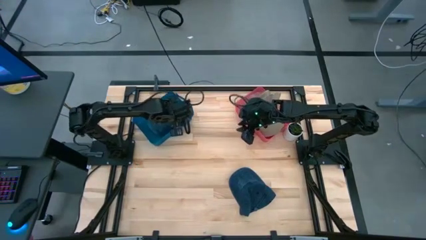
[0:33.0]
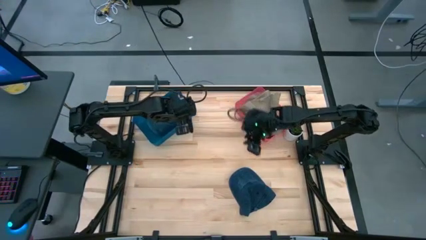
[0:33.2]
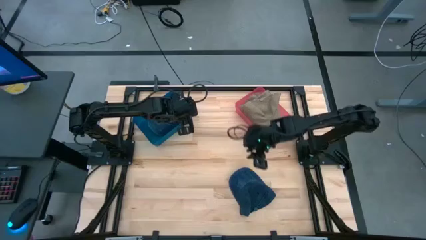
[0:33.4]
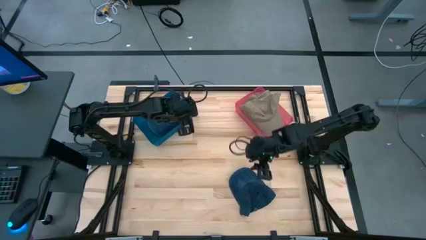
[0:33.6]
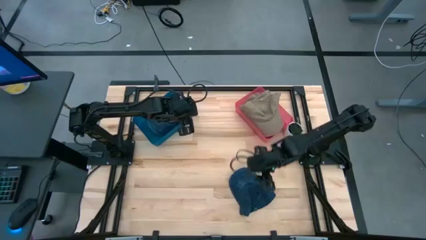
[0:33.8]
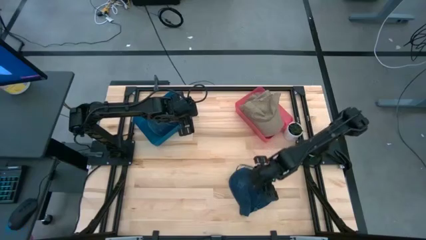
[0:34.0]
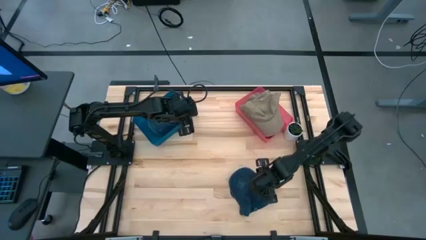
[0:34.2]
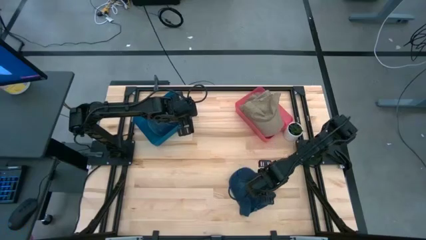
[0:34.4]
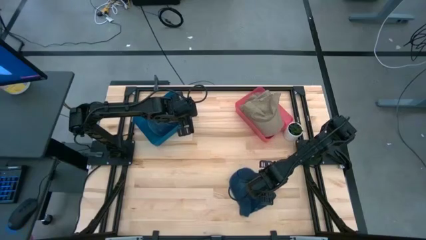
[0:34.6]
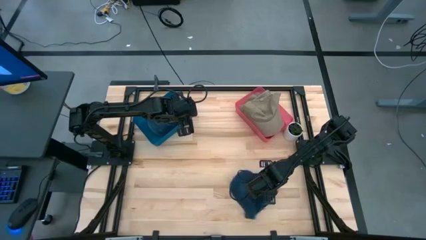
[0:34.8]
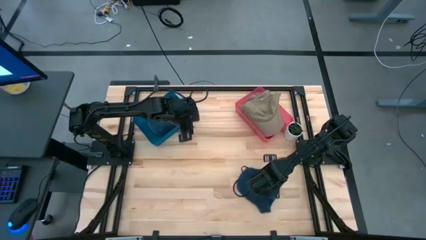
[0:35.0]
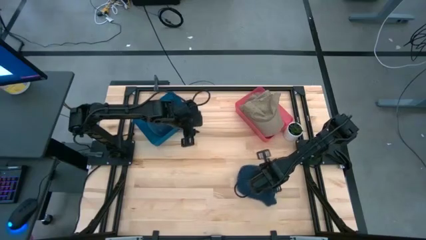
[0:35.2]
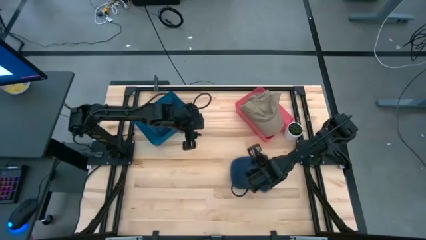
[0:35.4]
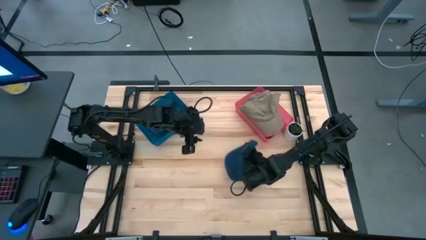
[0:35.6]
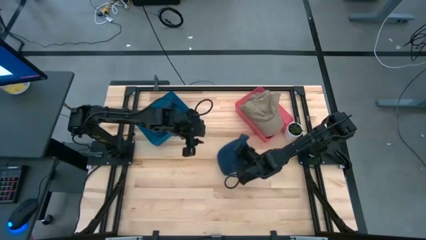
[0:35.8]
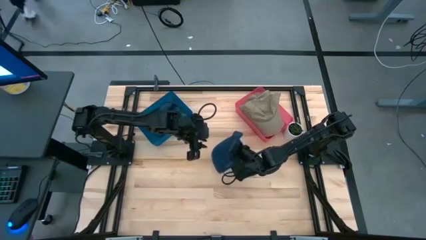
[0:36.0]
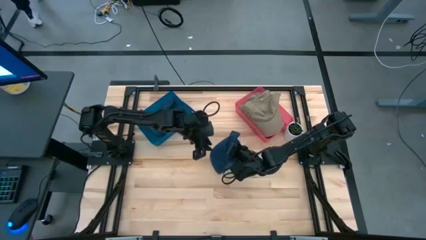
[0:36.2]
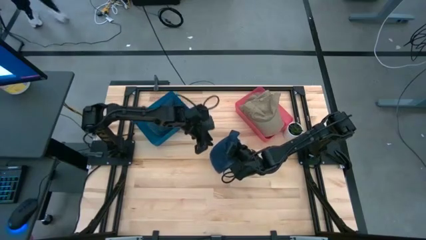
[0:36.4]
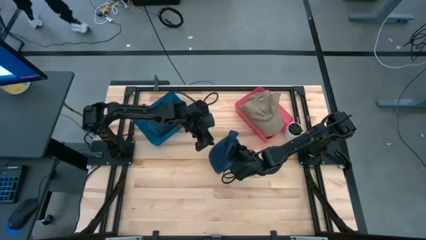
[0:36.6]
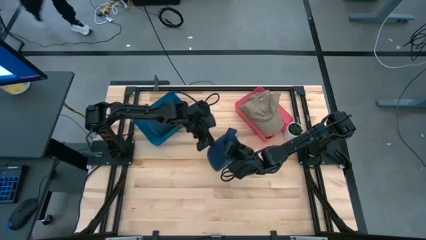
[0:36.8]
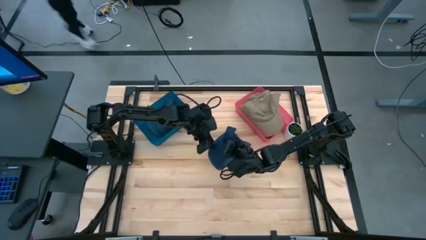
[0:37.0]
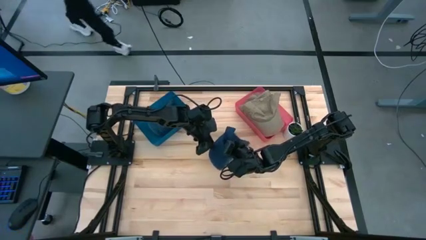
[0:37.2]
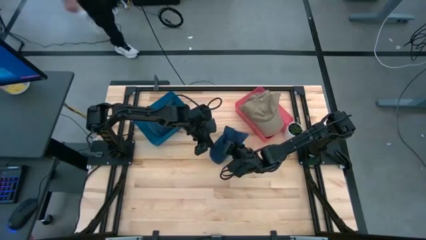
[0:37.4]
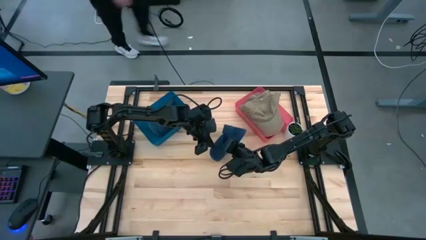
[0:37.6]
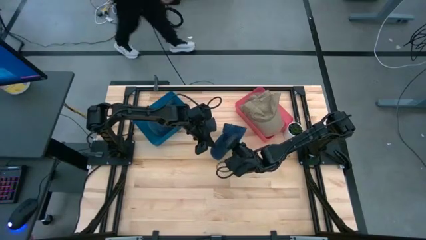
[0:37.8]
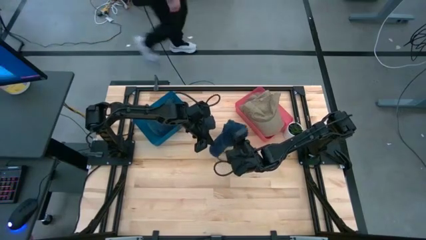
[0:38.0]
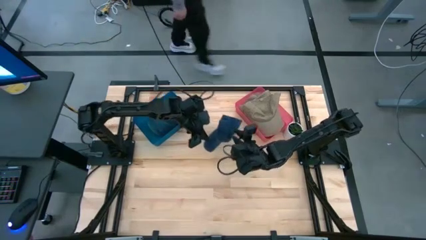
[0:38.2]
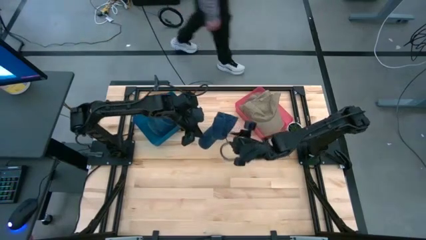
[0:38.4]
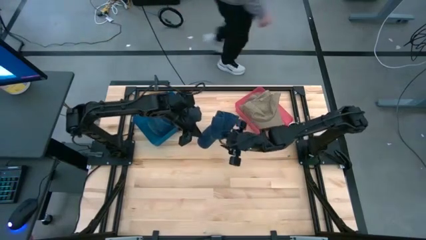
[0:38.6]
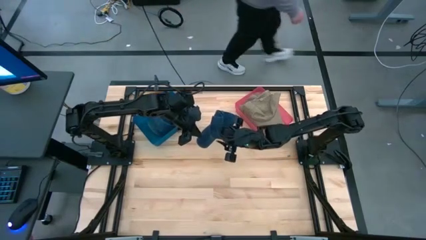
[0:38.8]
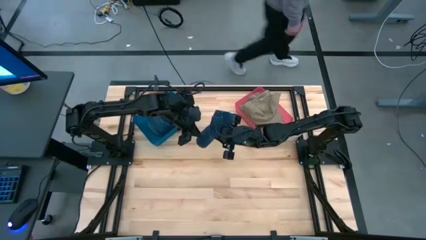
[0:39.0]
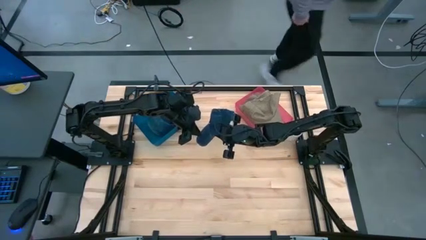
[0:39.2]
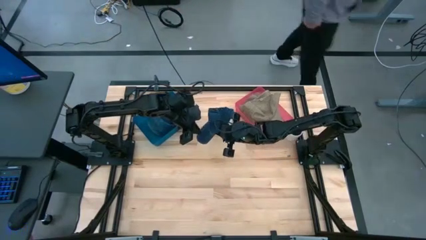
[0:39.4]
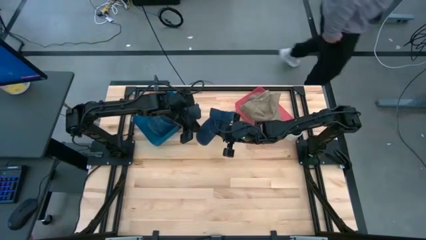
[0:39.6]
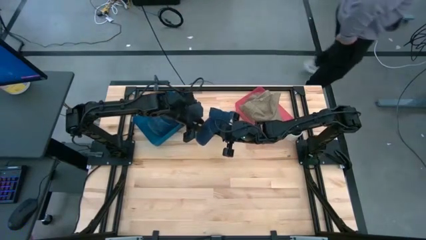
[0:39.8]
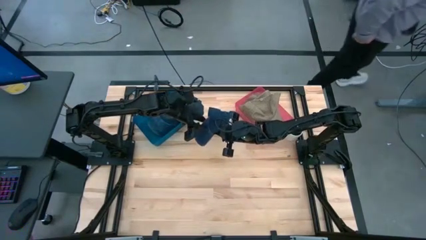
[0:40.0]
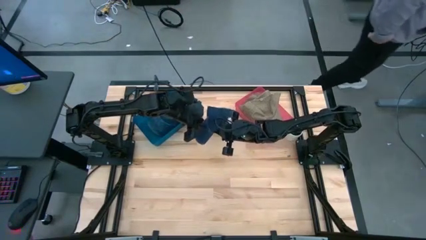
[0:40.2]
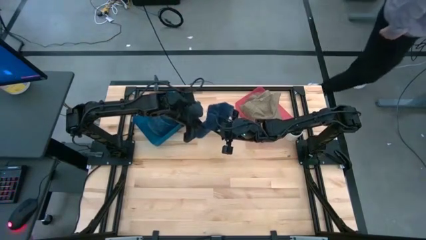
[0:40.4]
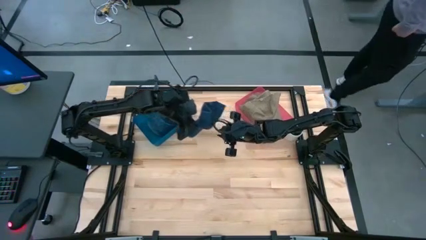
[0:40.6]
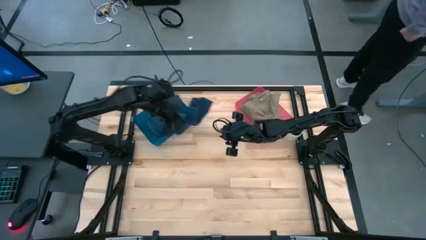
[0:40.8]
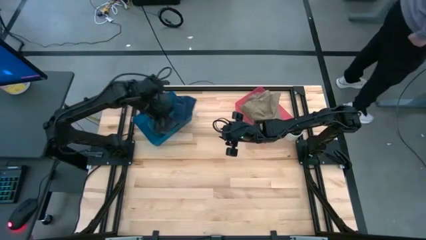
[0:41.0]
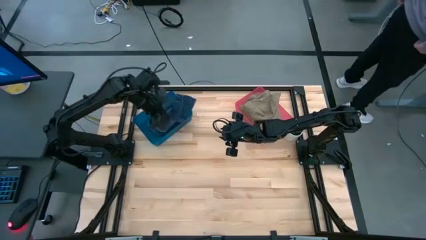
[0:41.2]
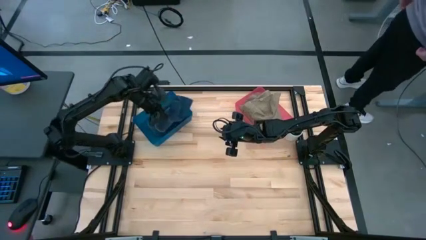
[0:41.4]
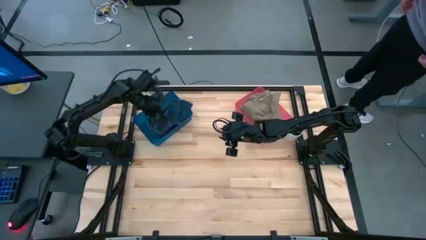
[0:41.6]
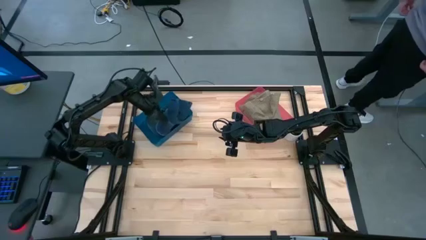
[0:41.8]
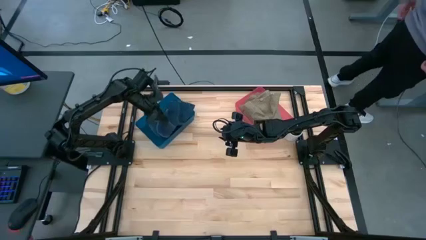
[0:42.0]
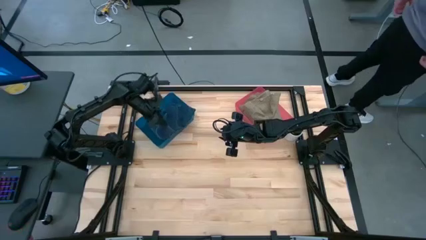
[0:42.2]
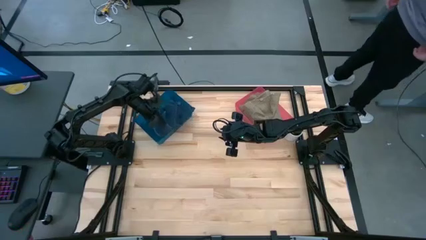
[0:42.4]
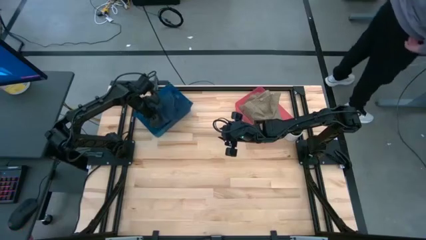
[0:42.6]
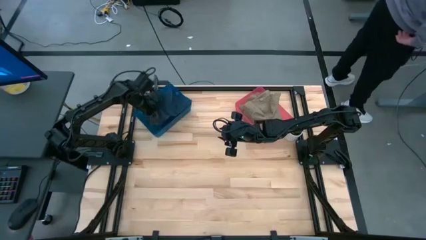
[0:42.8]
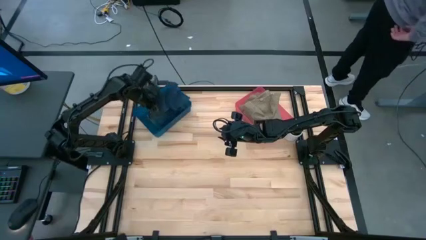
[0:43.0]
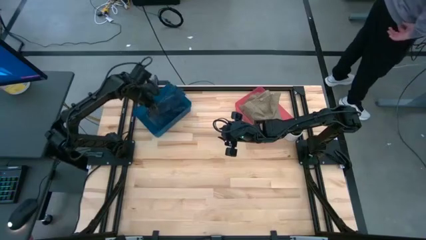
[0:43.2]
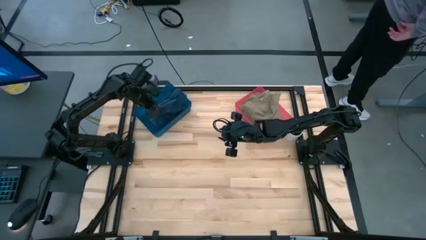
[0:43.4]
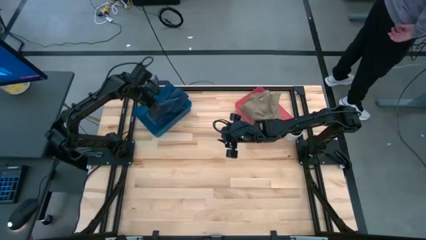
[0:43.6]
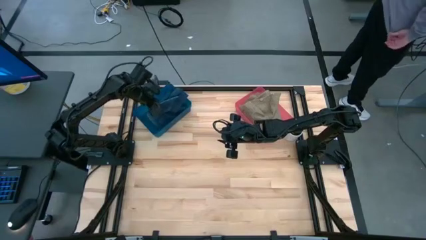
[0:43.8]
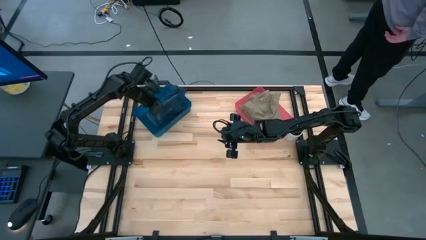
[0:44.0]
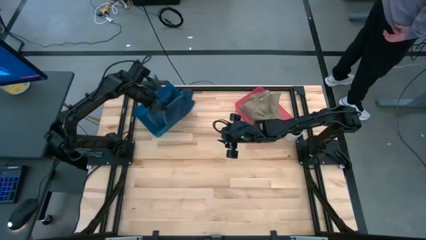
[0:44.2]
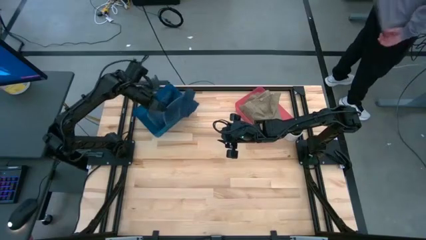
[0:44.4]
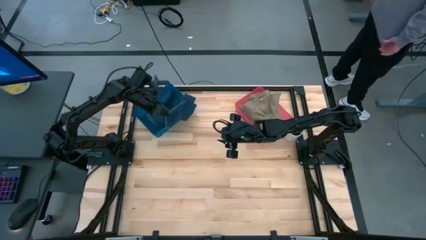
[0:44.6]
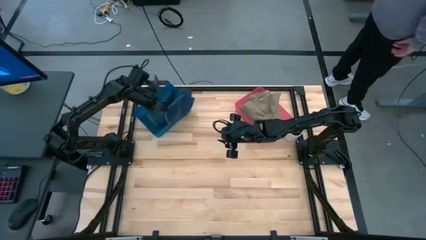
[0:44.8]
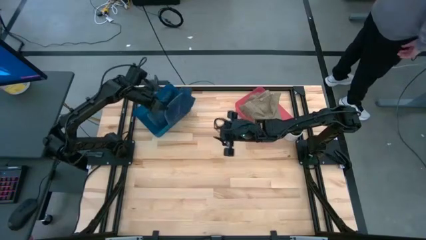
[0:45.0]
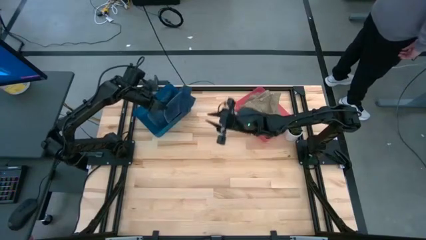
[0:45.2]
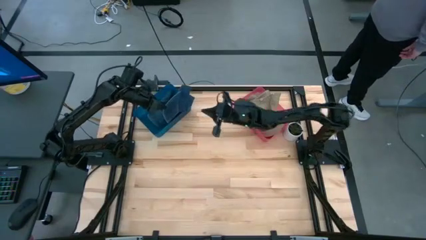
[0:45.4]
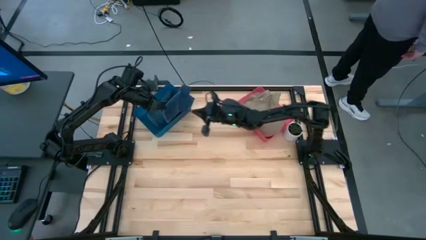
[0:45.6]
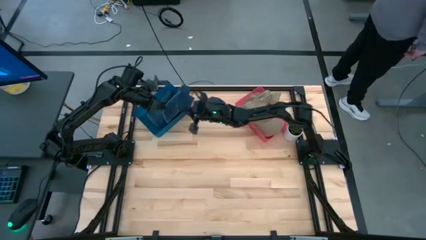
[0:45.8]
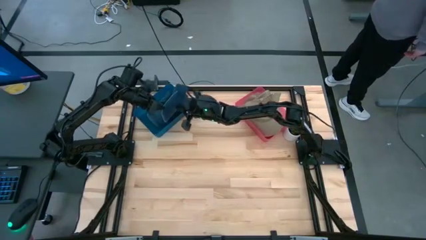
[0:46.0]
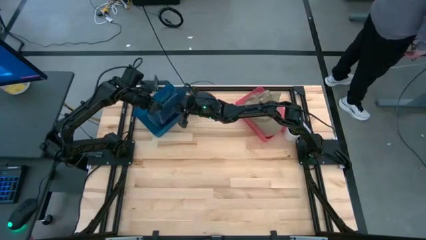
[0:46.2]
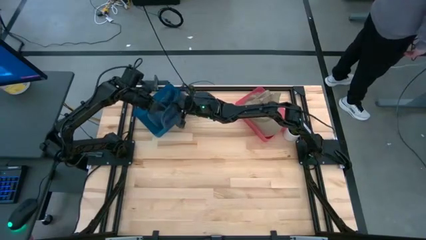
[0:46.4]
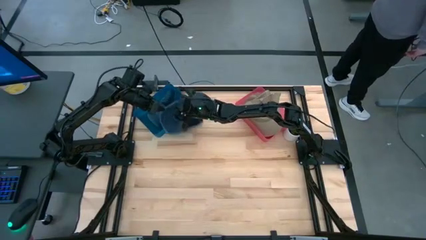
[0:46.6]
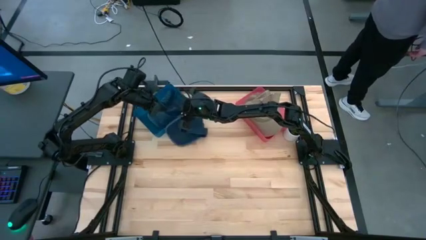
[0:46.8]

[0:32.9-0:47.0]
Task: Pick & Place hat
Put the blue cap into the blue bin
